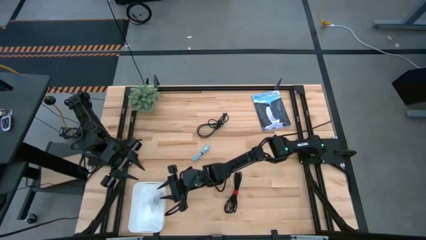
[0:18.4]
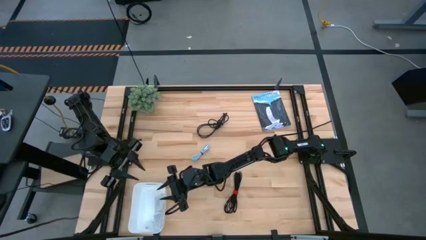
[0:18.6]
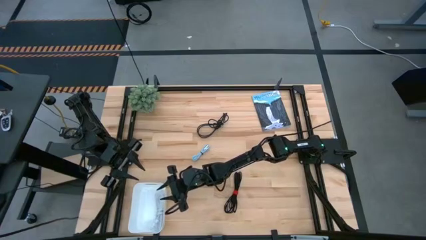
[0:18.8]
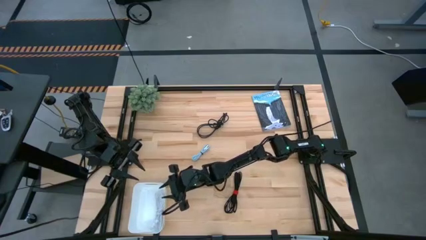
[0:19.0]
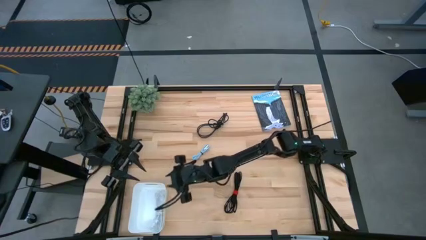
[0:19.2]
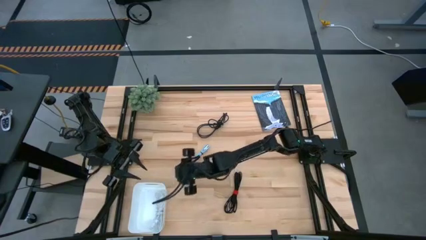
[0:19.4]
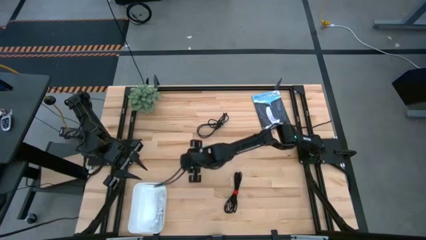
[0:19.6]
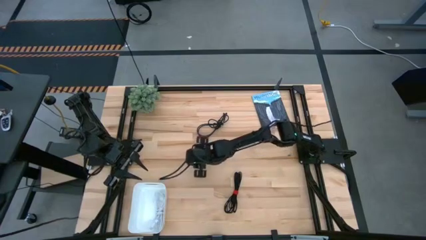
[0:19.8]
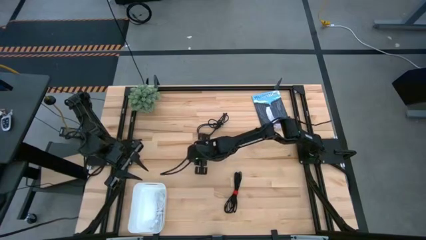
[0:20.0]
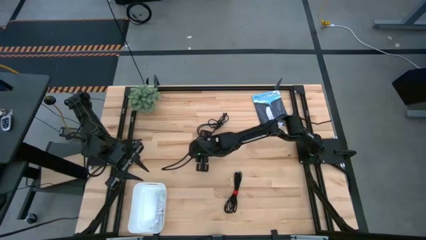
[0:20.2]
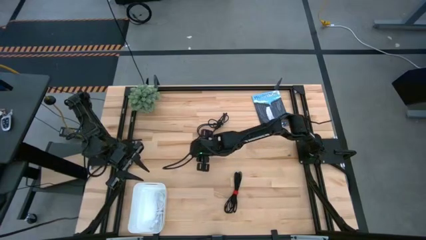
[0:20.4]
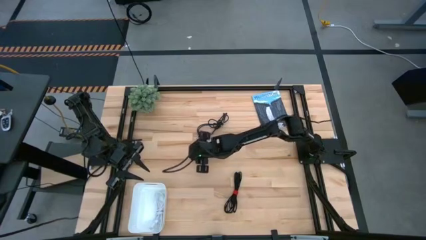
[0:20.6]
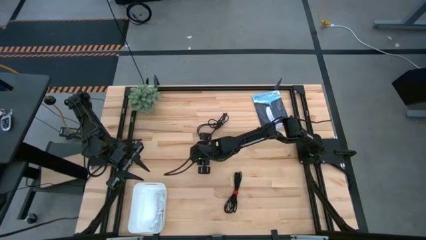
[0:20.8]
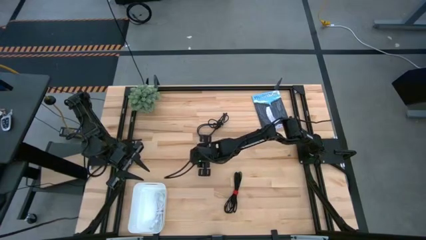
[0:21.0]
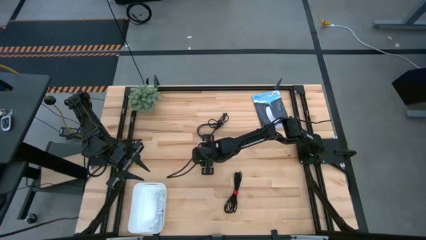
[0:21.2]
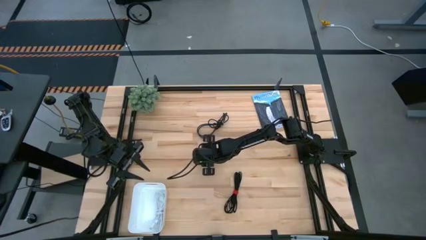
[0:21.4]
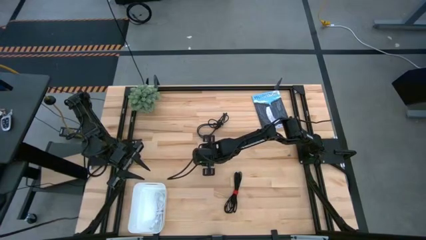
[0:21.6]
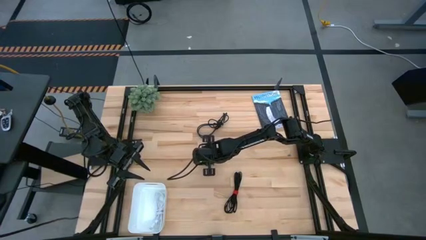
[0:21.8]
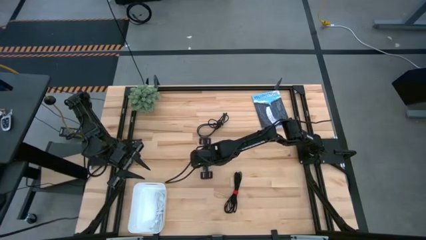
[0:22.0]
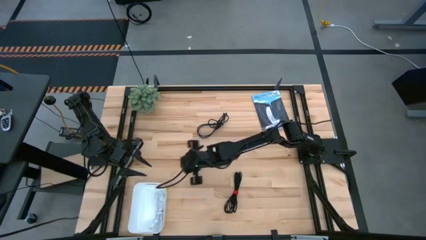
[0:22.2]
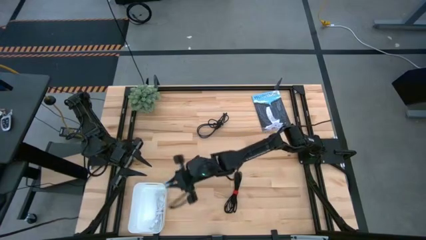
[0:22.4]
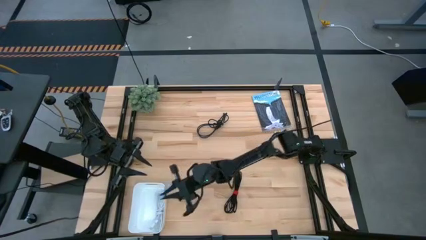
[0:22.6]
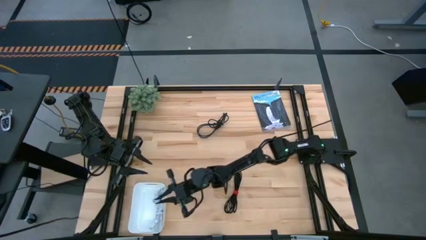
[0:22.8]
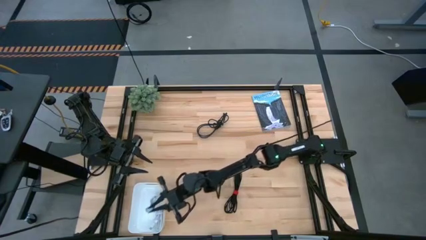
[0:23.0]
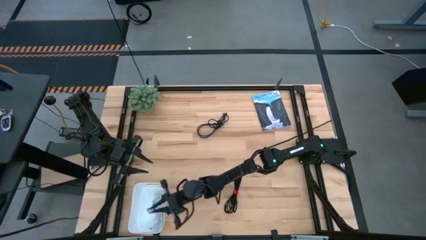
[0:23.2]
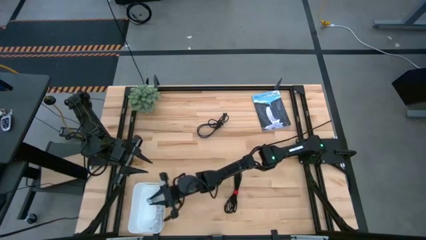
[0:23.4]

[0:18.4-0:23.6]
Task: Pick and place USB-C Cables
Put the light blue charger cable into the white bin

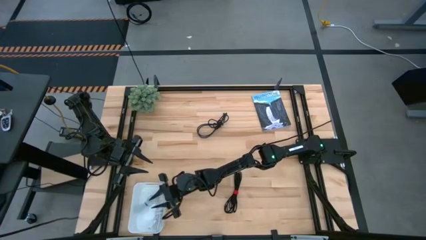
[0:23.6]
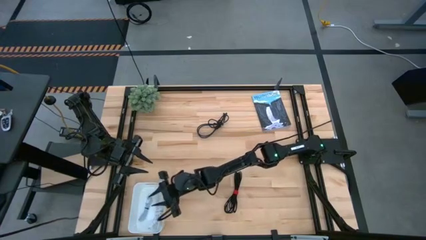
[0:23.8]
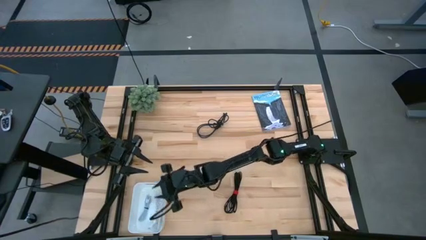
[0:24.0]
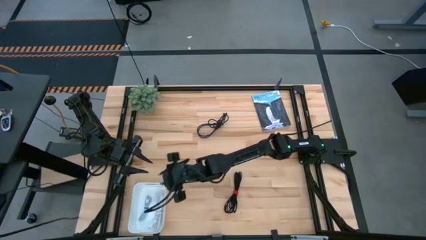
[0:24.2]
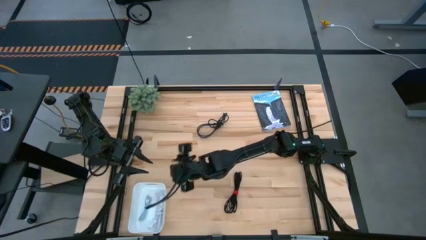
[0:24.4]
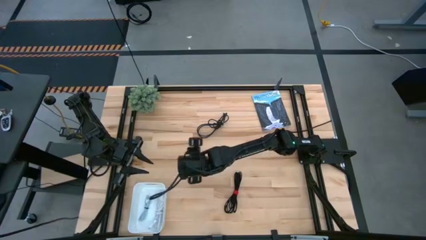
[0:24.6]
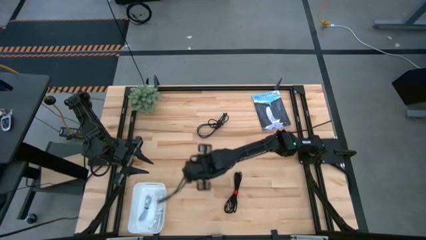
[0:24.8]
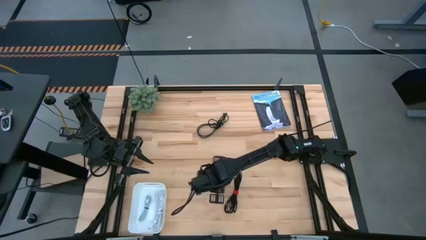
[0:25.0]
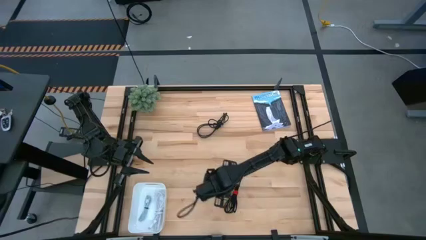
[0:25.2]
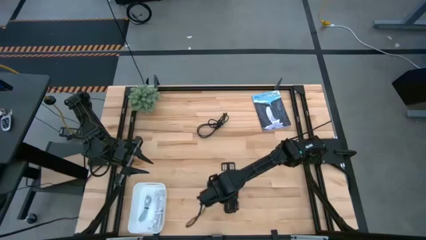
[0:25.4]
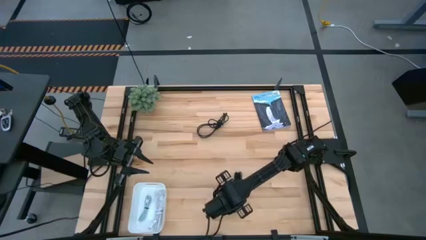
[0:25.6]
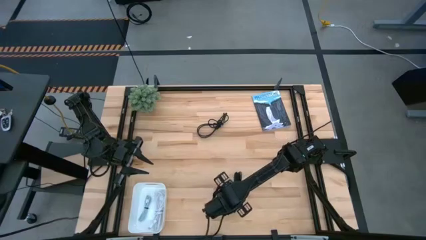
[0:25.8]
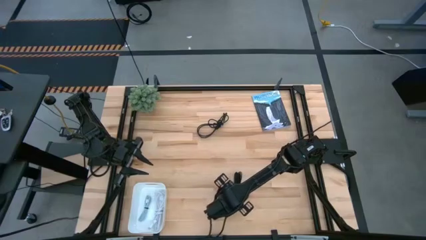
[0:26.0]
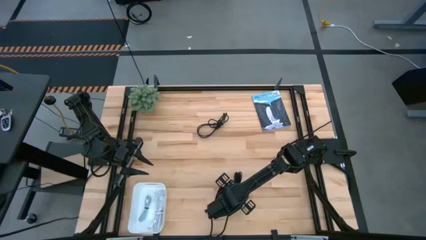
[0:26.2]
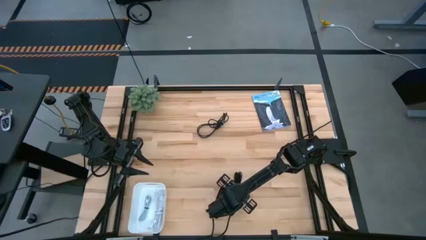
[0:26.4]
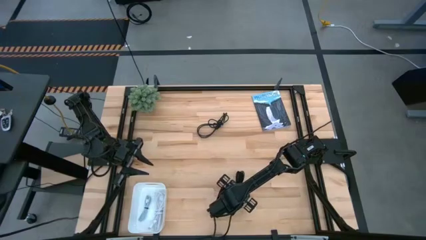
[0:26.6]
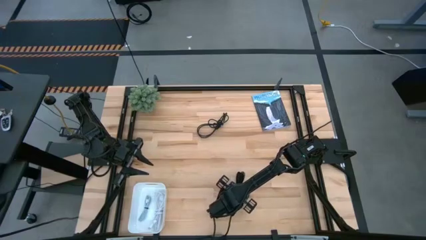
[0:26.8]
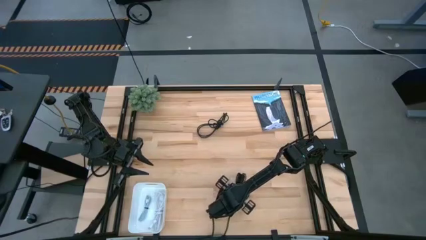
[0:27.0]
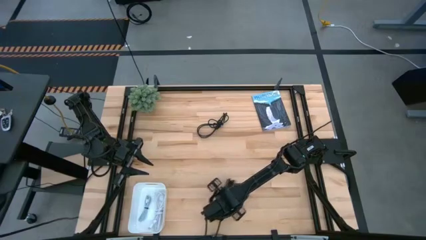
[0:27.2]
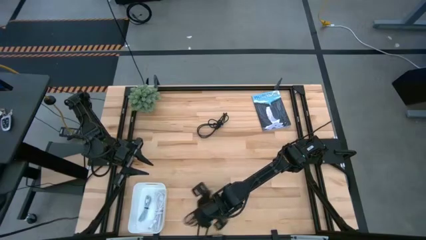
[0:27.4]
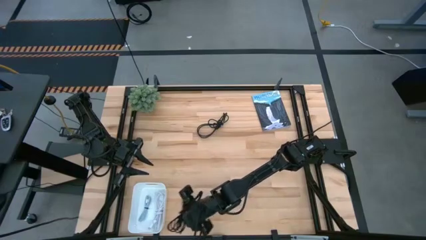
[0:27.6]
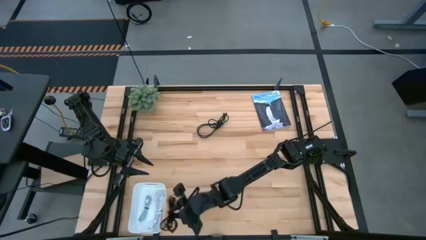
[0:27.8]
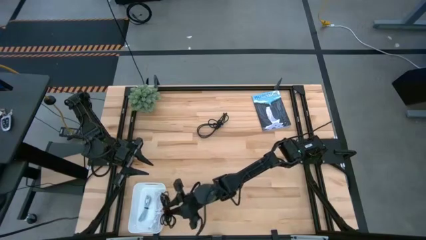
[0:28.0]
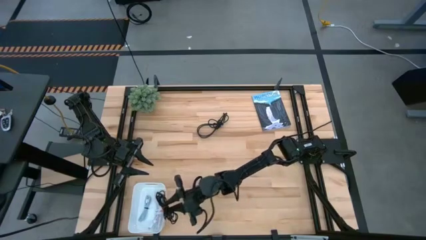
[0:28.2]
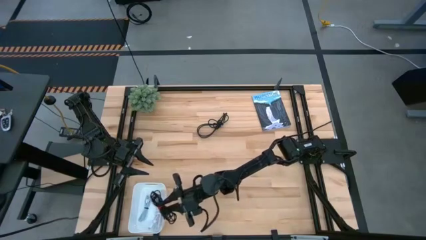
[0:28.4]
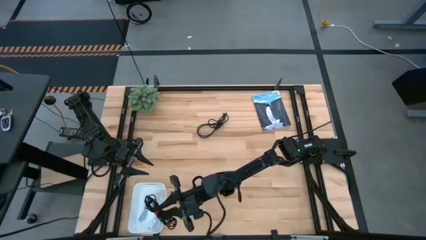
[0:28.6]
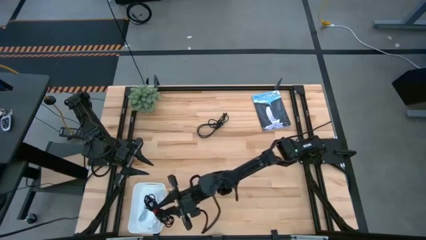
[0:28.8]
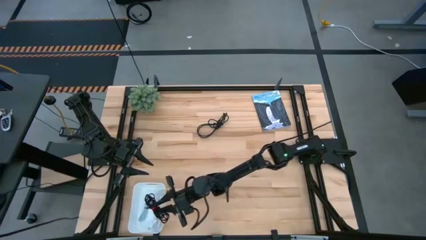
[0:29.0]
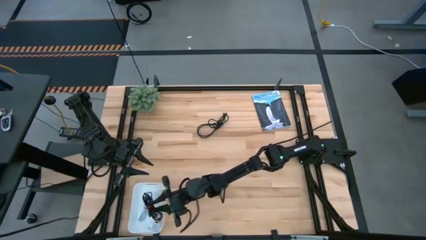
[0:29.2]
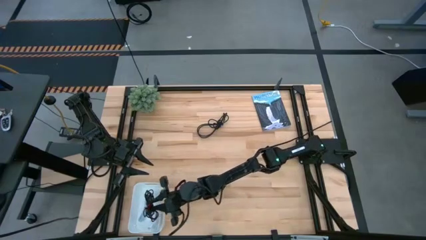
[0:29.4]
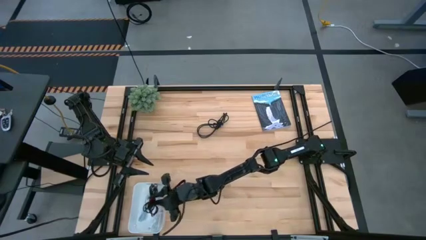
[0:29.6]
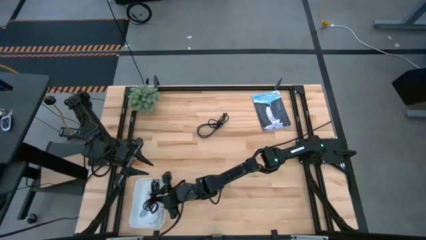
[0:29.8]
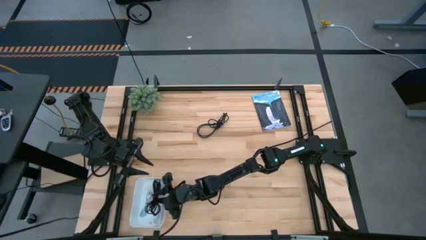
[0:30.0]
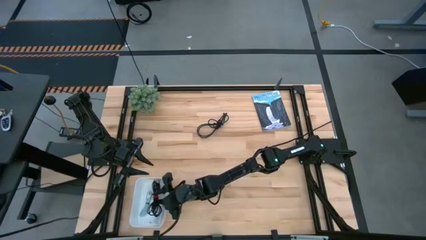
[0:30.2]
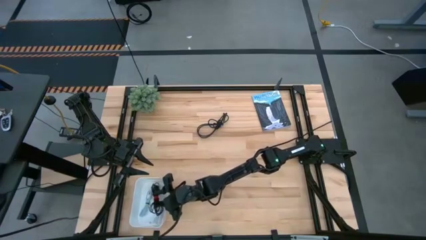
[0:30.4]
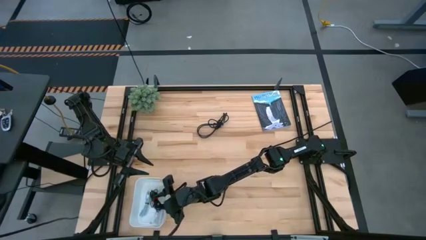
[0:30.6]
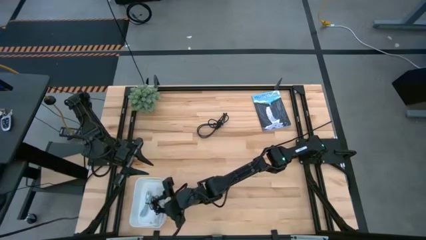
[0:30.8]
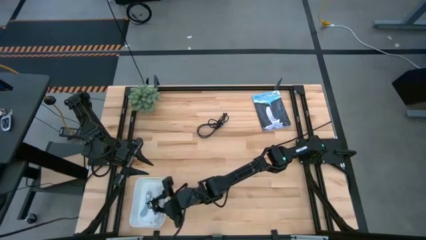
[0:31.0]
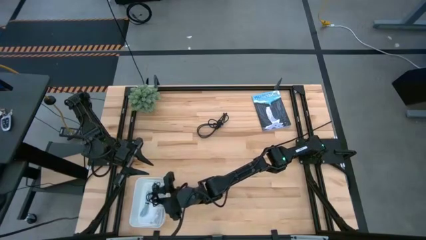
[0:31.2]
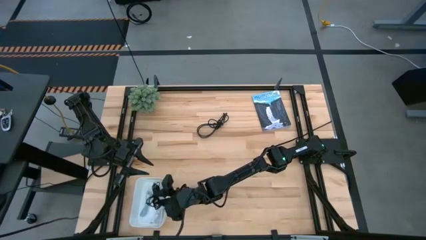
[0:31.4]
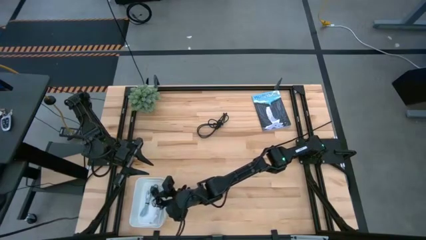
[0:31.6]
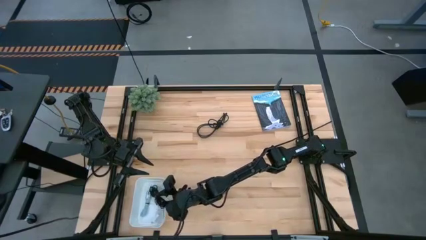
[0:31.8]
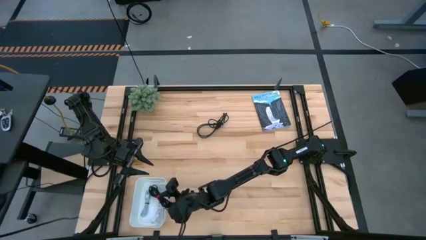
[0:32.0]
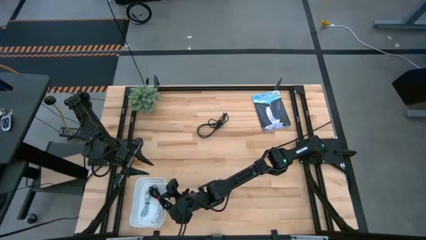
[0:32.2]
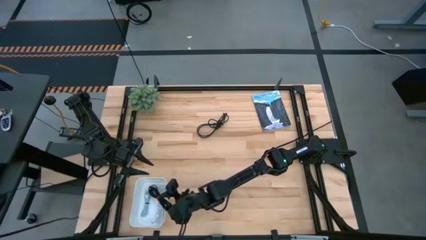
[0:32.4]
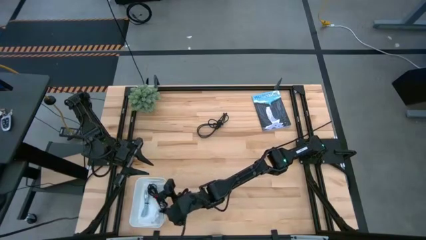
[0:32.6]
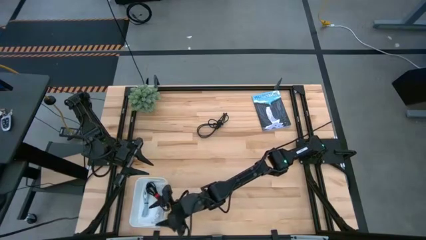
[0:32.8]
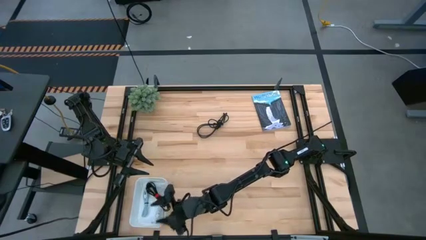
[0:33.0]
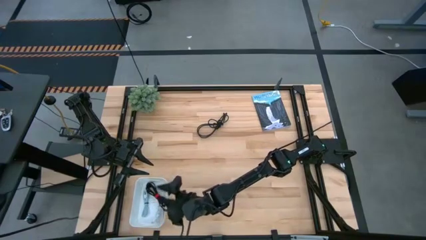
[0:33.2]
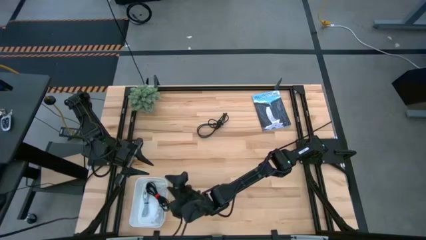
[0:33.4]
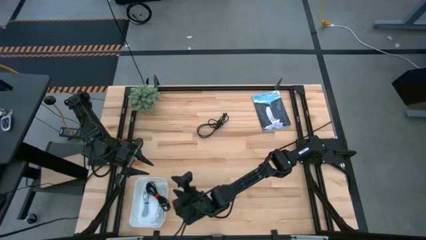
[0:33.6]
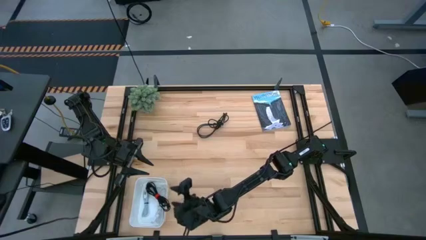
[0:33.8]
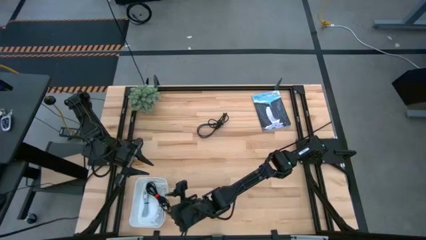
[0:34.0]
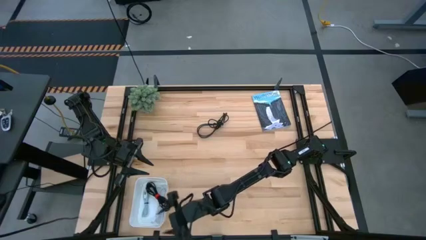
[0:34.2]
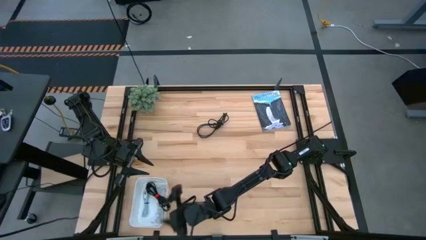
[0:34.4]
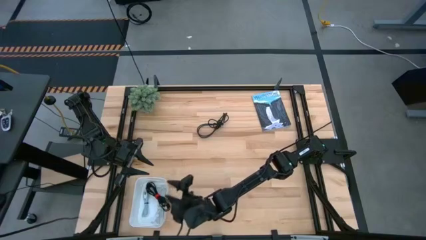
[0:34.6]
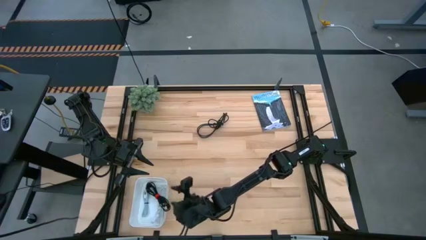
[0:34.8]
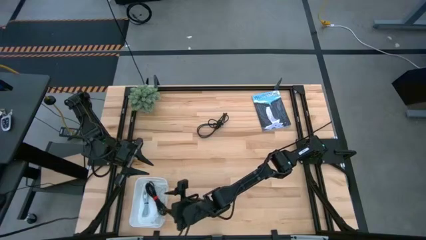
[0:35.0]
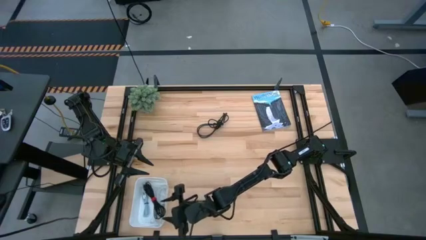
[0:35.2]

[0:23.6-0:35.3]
Put the bottom black charger cable into the white bin
